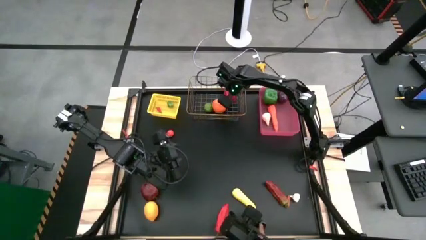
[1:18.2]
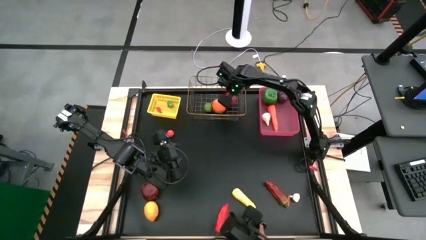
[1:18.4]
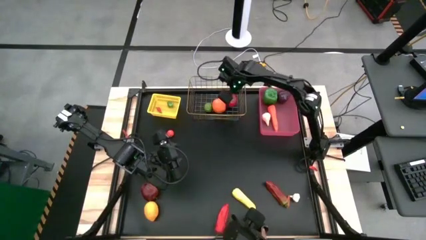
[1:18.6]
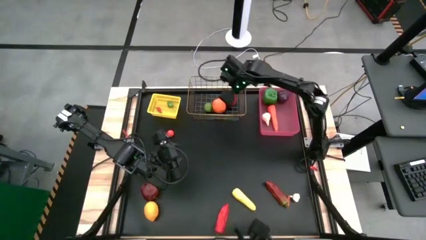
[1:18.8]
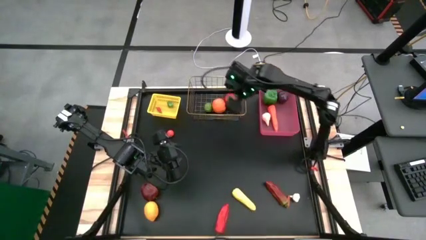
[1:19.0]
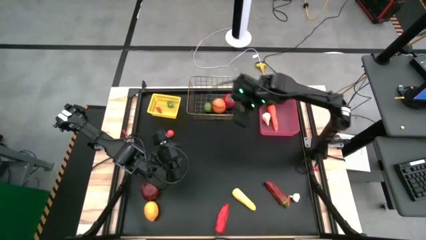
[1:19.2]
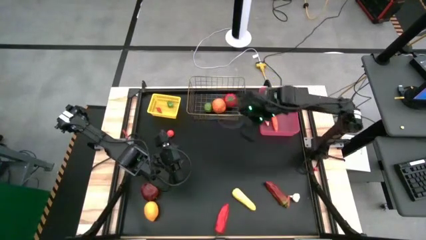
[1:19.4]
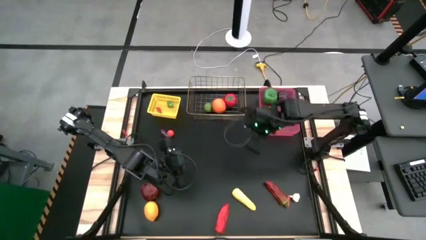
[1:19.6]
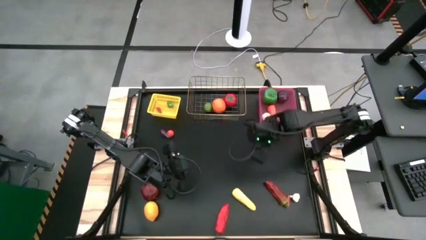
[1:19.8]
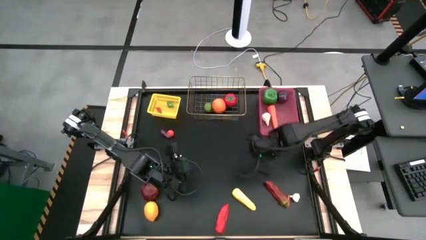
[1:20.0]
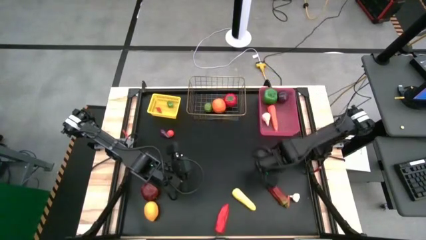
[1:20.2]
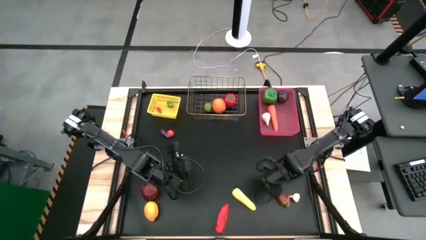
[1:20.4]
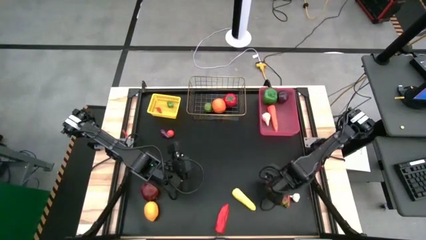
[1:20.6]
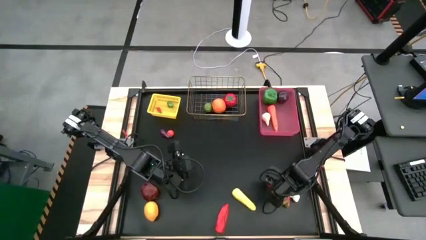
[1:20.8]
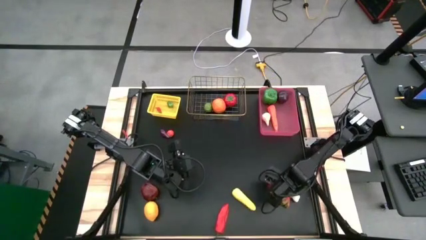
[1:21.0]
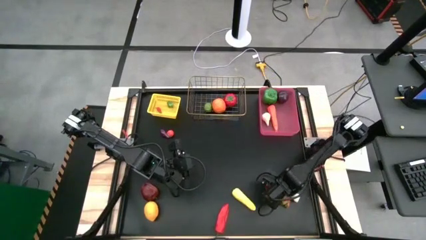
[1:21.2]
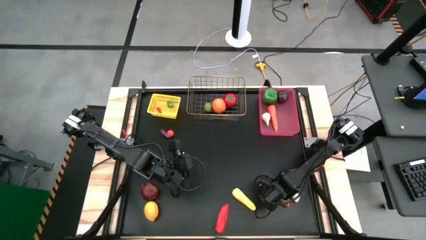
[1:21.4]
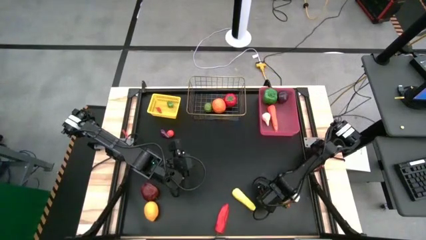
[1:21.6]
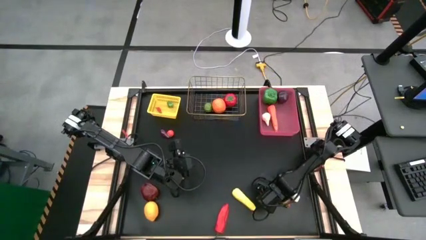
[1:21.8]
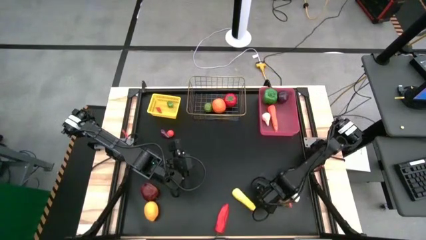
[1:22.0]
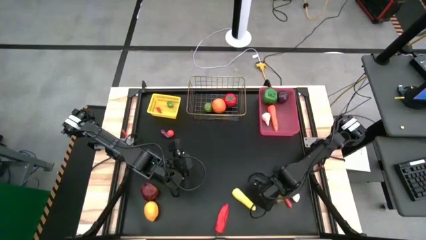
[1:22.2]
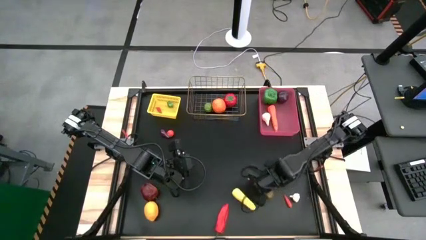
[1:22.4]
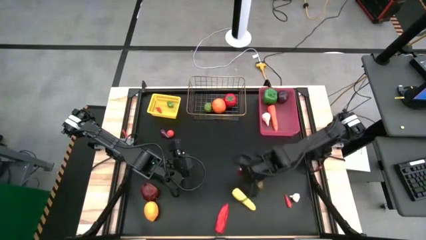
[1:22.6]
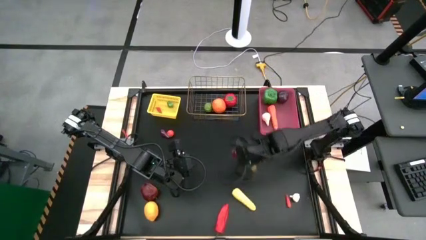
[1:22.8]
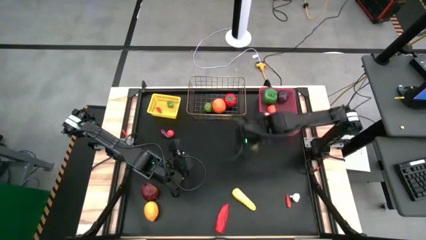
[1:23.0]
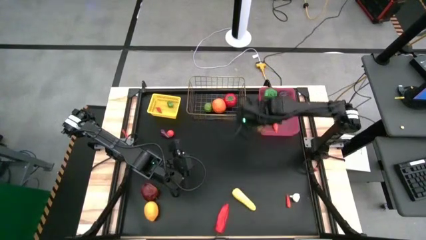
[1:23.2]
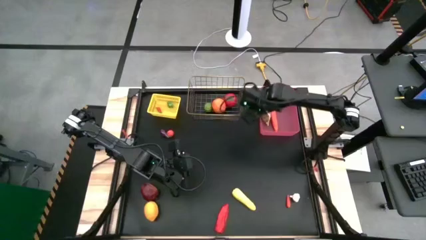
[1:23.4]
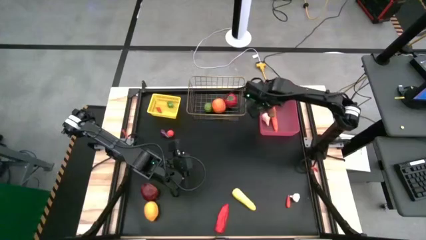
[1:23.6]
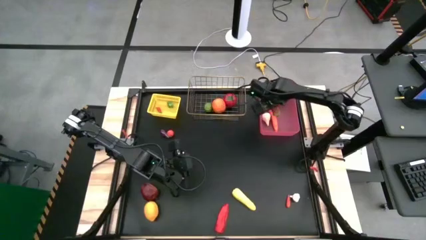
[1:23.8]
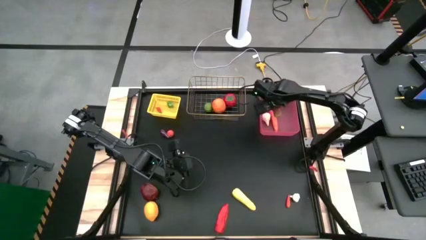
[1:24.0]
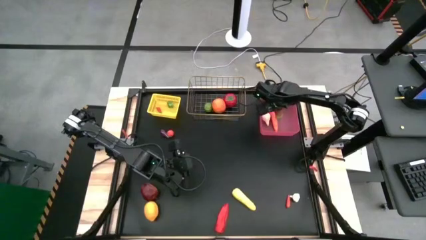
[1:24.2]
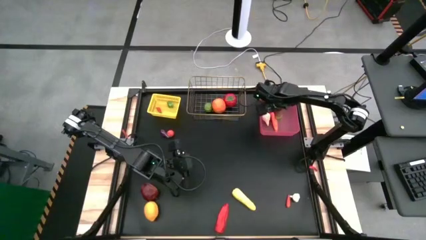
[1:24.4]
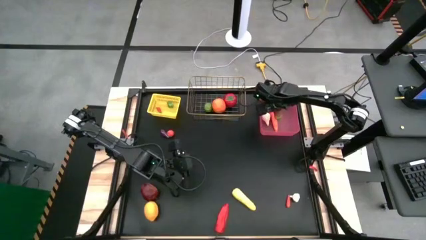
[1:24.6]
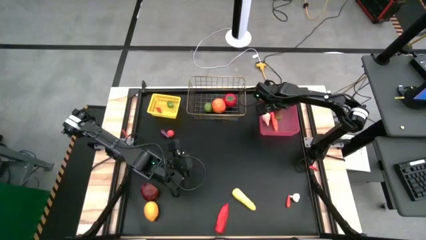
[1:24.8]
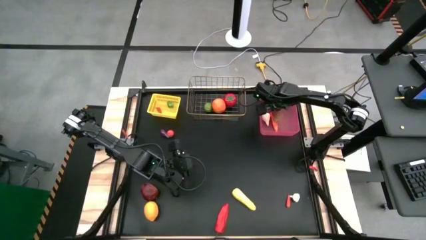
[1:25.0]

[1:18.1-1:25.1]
Task: Sort produce into baskets
Put the large top red chili pepper into the pink bin

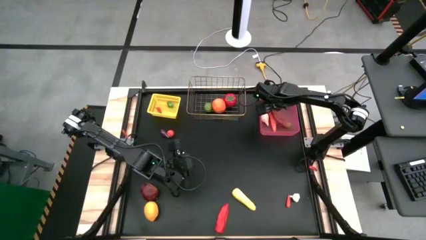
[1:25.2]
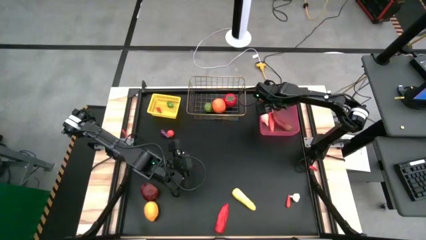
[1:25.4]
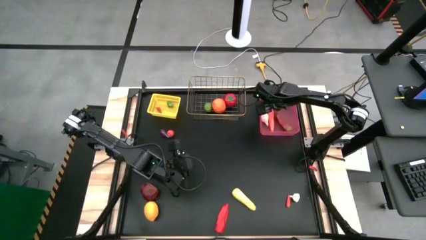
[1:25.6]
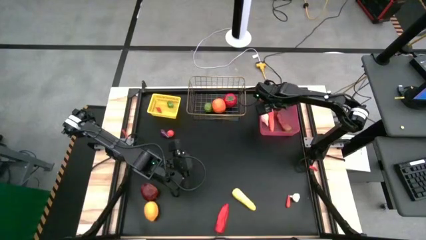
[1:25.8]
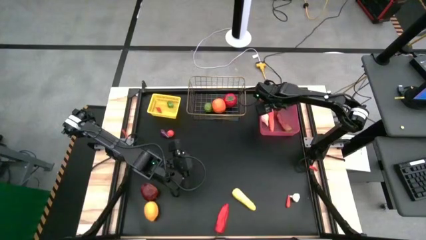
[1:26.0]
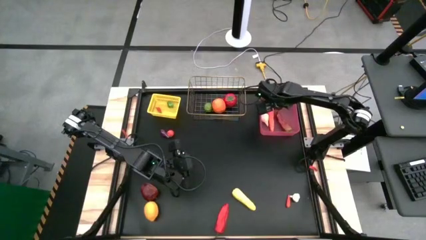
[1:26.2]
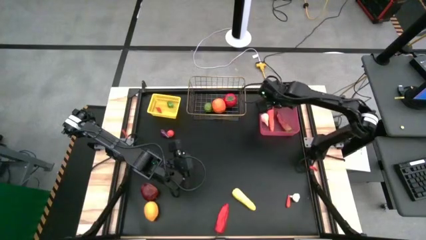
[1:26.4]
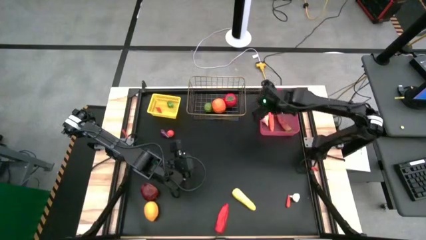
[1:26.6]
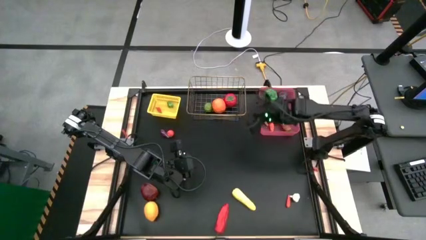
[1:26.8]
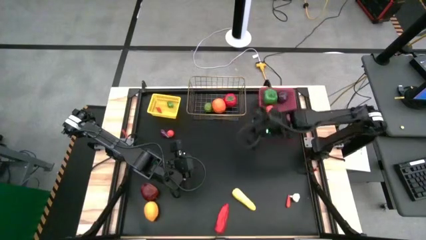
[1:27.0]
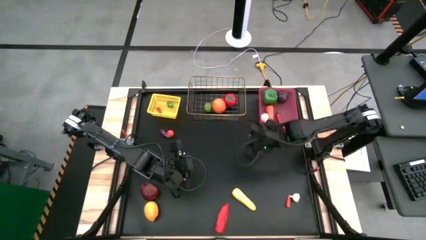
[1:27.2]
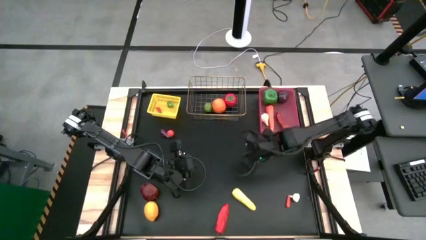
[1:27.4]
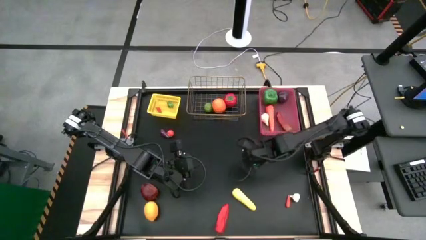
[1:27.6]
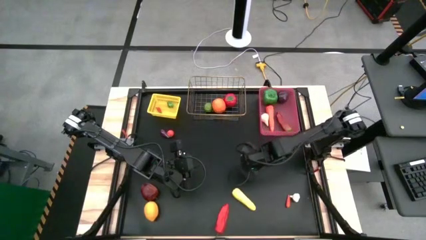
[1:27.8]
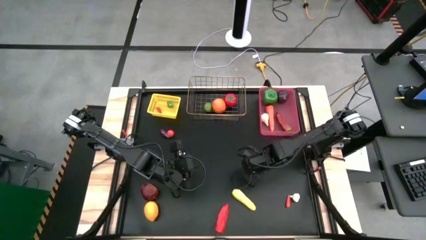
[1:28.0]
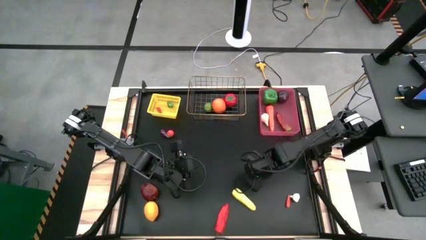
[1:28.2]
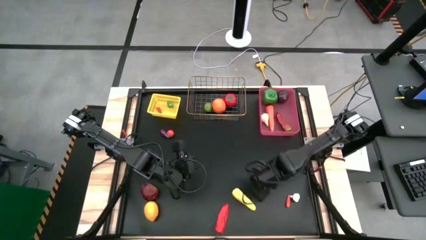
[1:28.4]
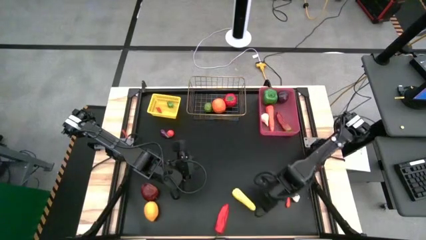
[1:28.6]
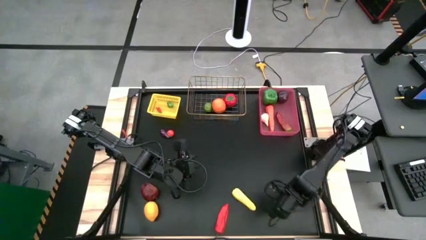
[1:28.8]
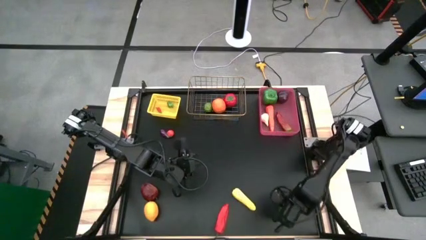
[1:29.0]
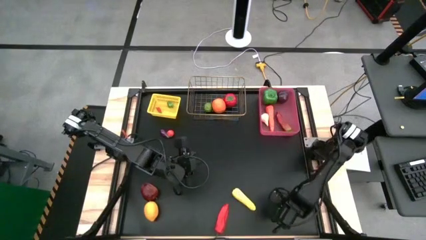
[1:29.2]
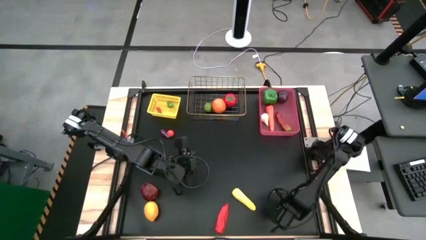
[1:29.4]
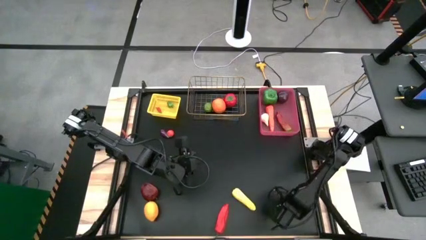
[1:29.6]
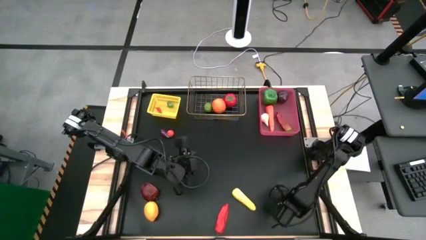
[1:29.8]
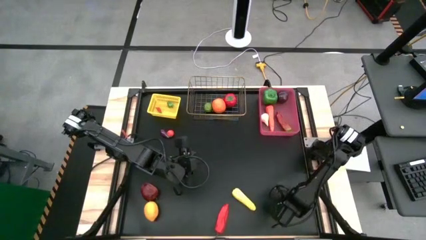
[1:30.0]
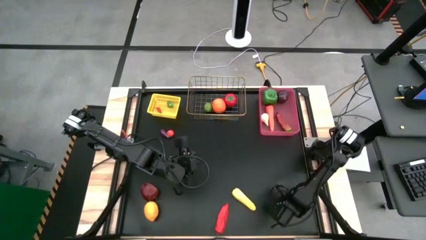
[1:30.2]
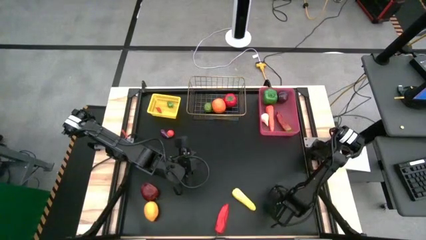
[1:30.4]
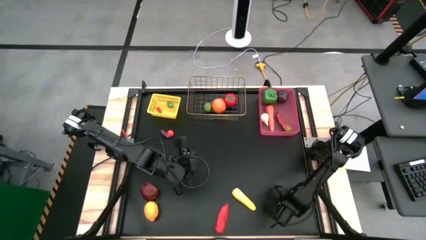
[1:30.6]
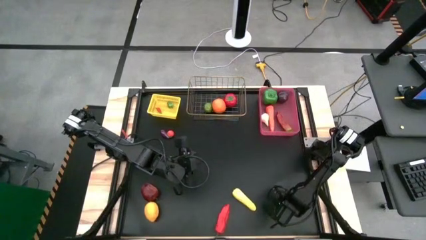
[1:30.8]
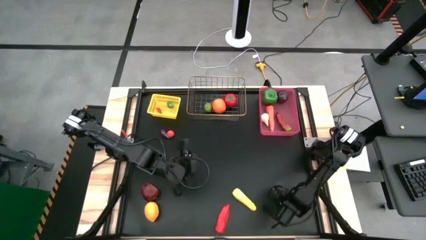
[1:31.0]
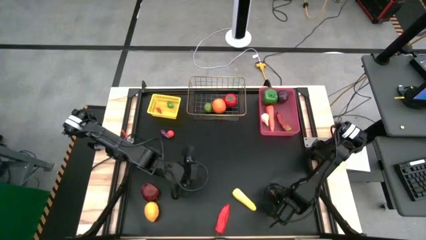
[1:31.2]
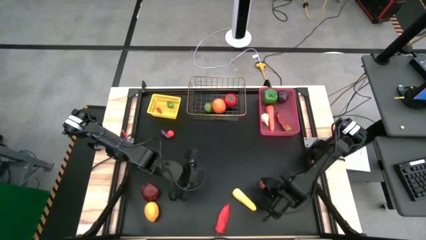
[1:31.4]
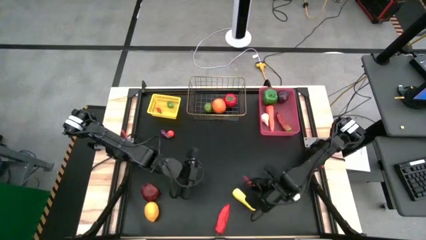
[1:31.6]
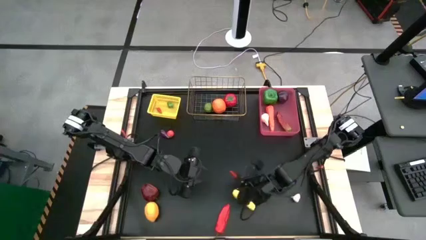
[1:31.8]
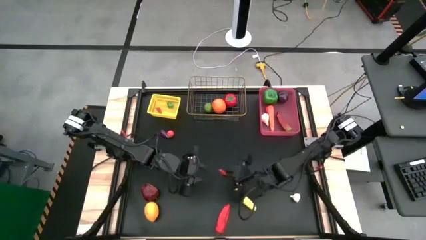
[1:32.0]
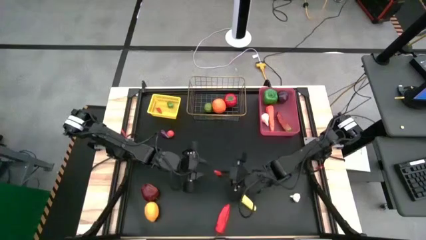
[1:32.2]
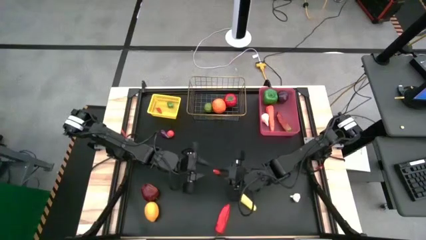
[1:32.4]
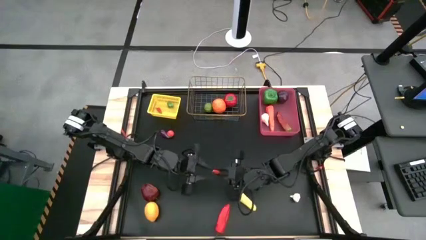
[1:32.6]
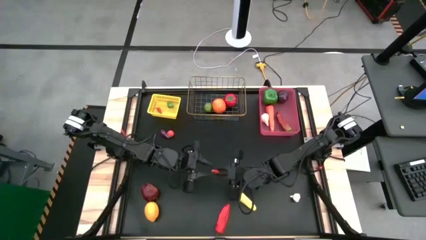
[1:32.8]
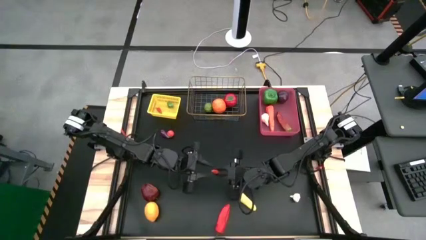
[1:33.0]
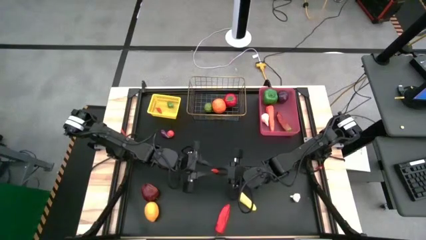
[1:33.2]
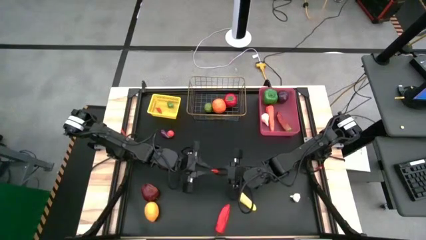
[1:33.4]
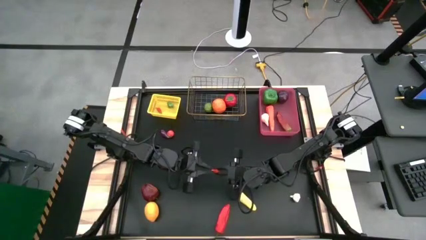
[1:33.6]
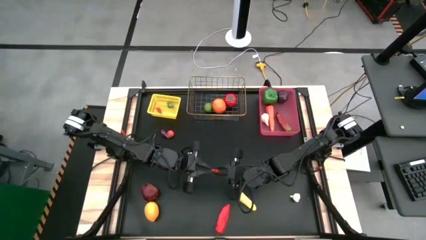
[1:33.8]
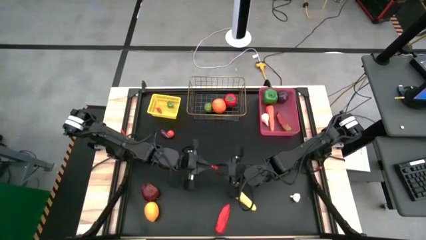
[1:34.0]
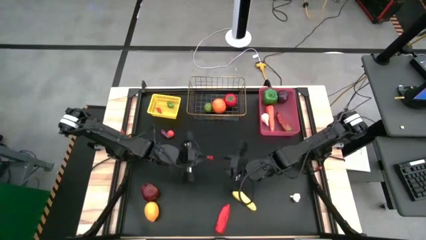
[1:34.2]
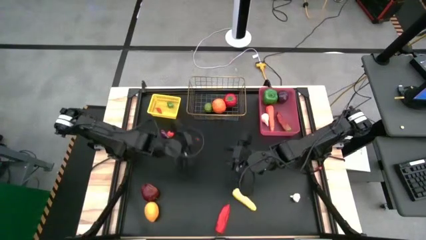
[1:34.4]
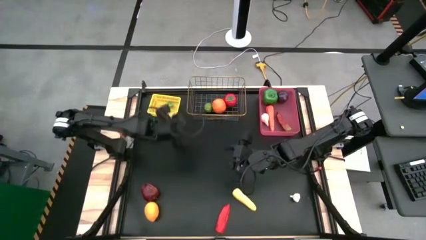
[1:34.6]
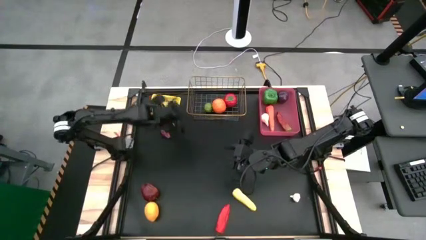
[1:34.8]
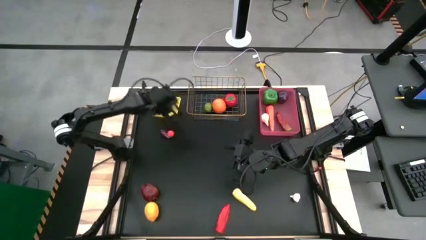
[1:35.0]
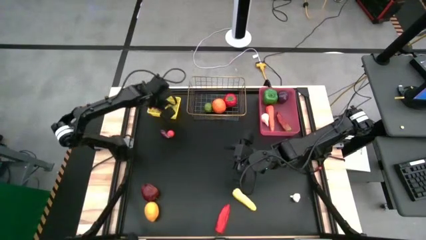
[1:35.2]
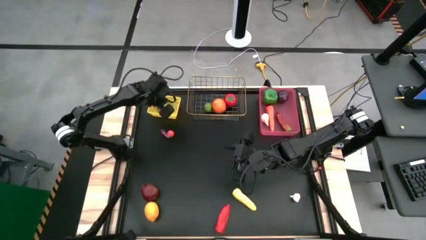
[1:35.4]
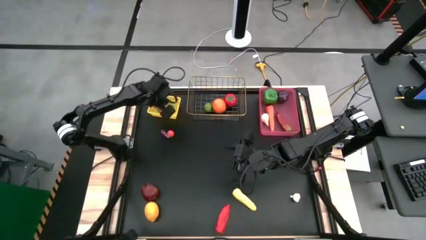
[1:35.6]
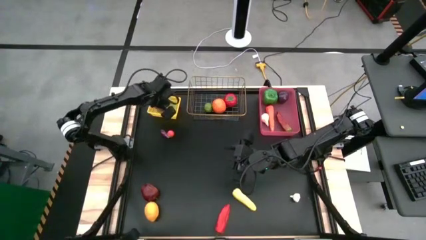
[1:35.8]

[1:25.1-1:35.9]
Put the small orange chili pepper into the yellow bin
